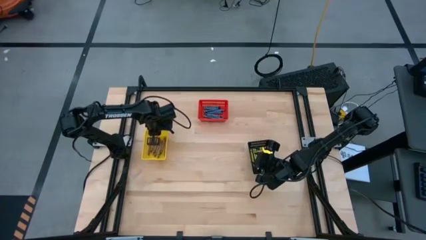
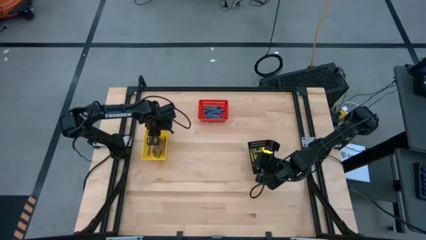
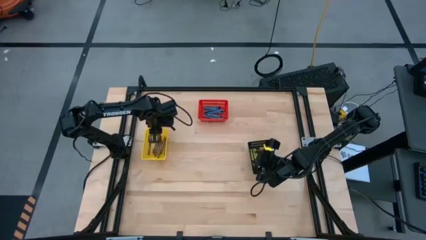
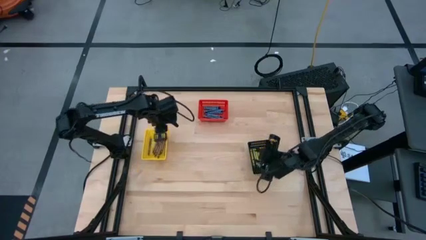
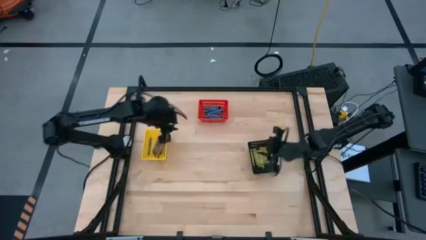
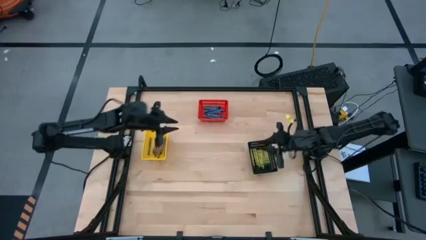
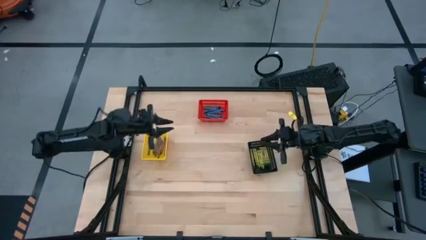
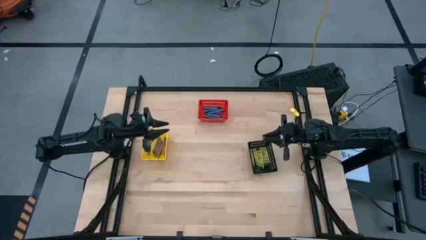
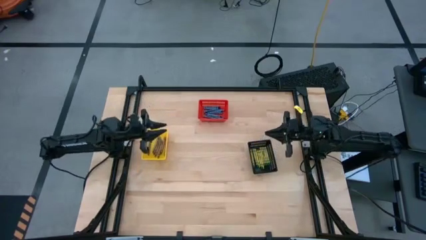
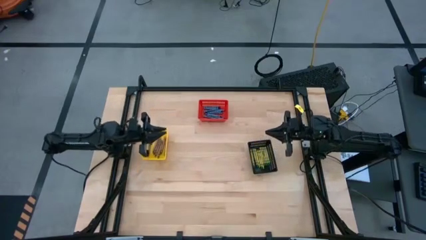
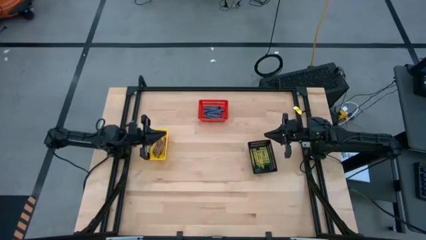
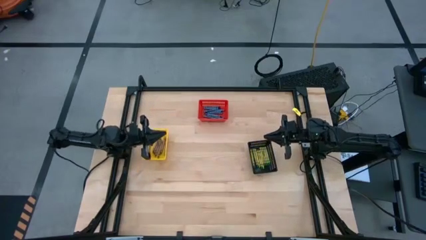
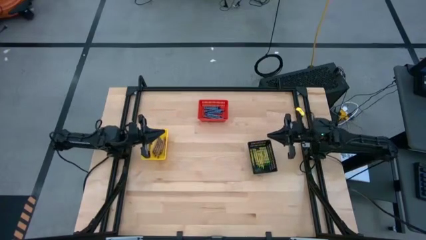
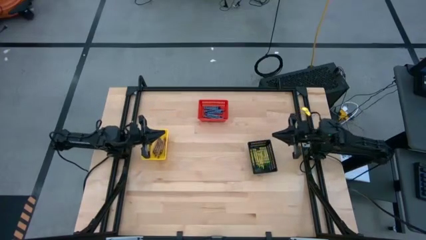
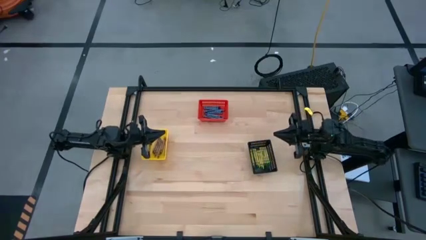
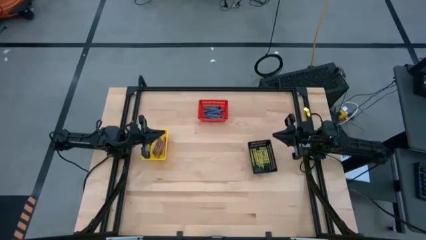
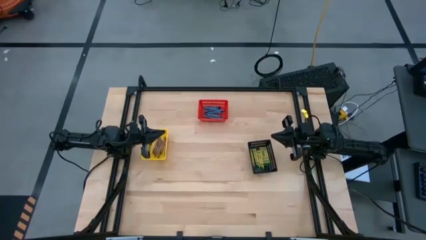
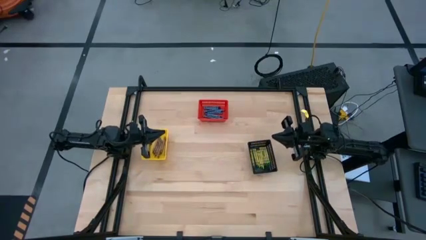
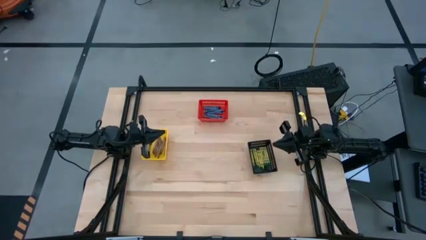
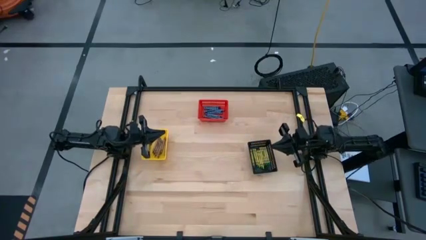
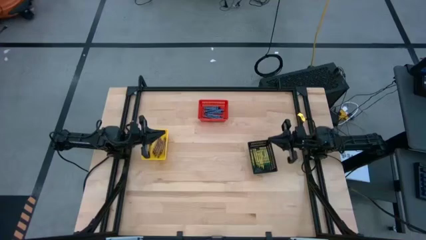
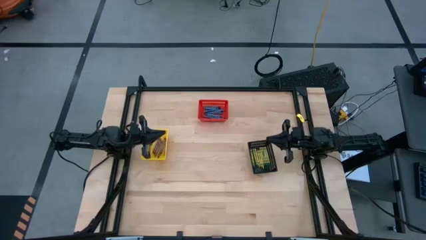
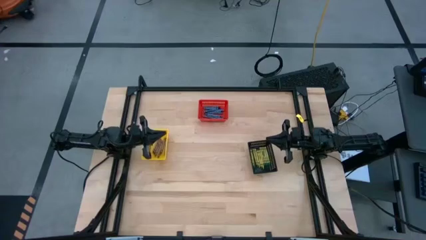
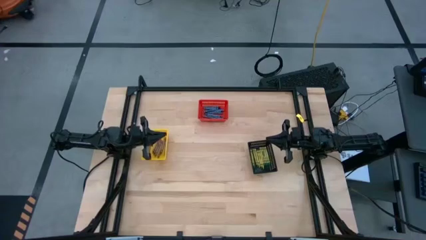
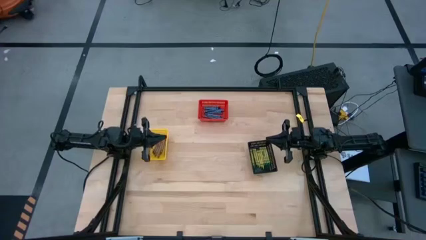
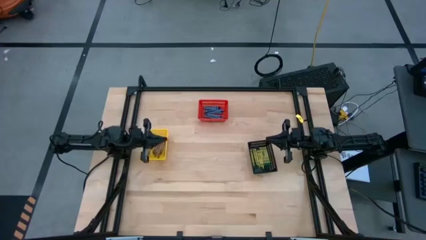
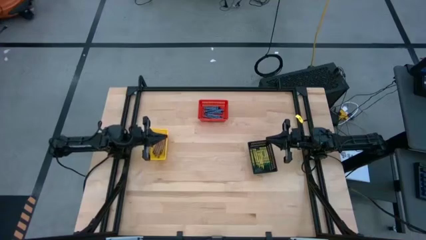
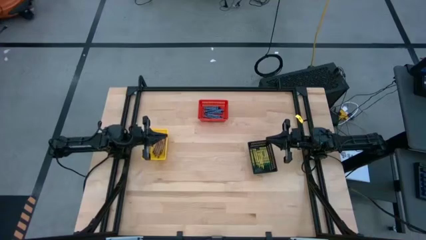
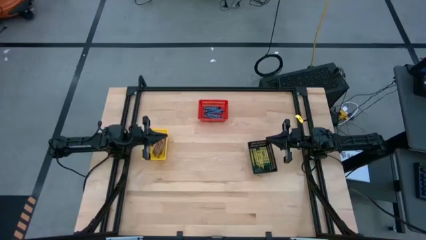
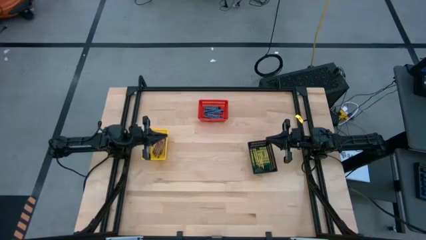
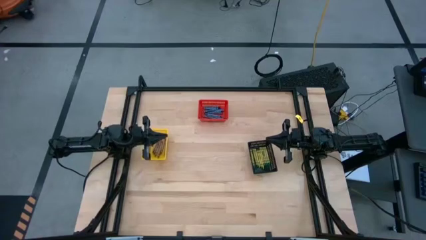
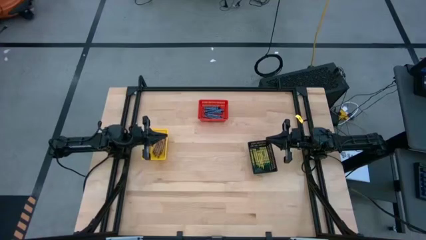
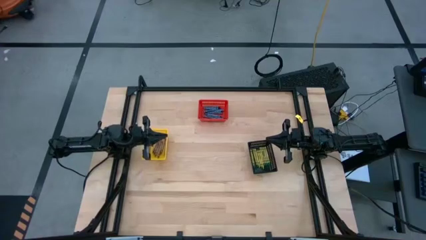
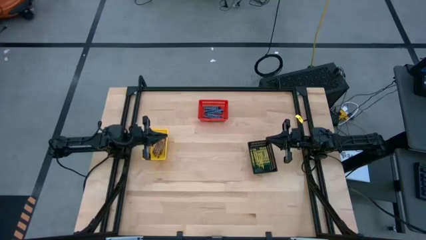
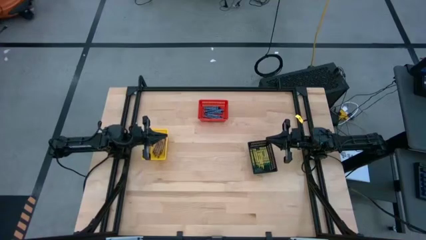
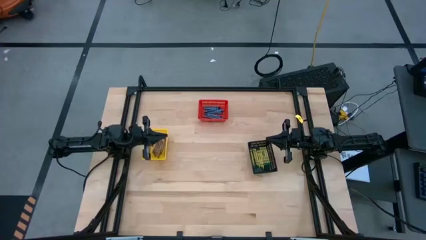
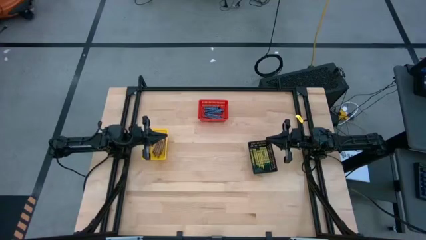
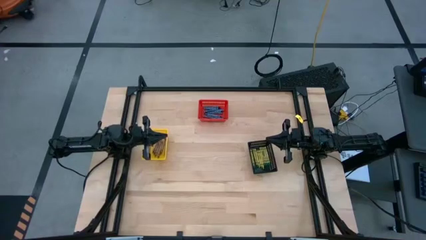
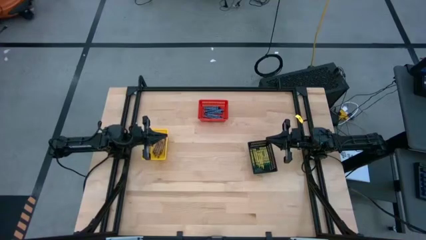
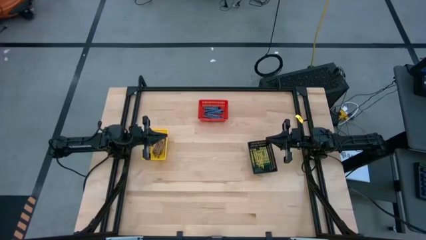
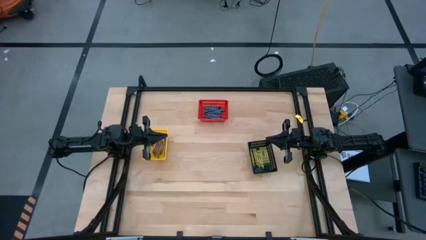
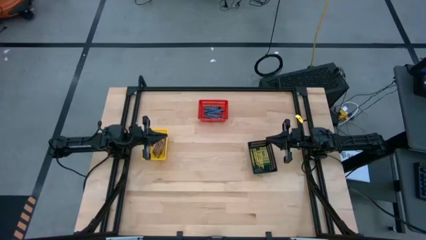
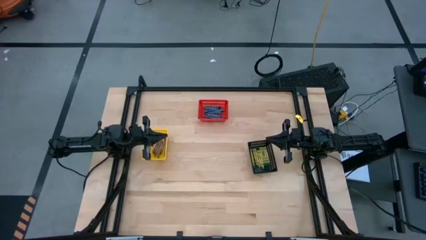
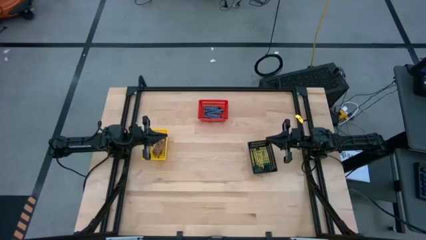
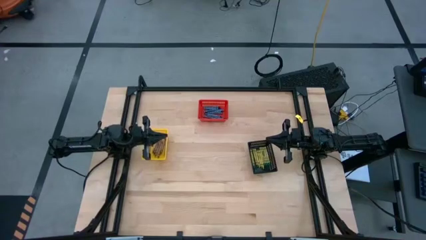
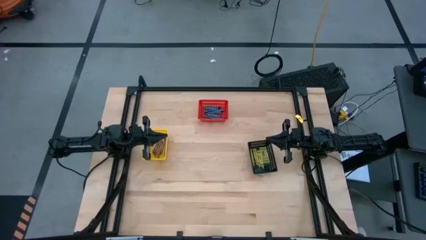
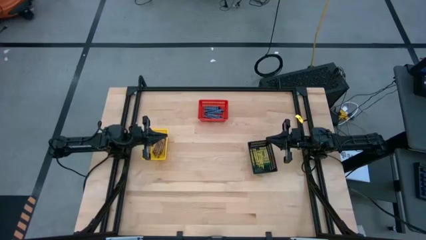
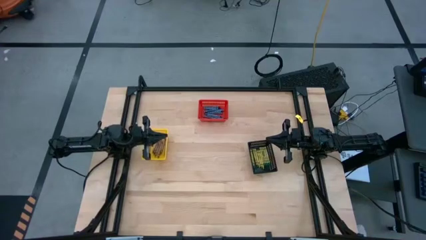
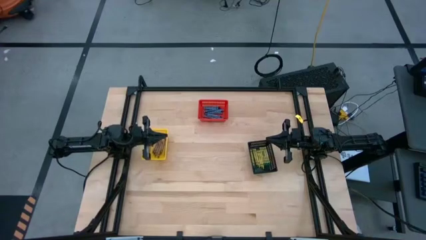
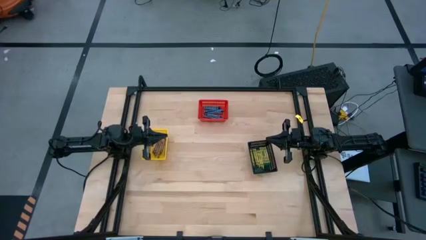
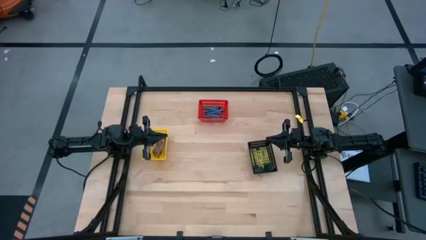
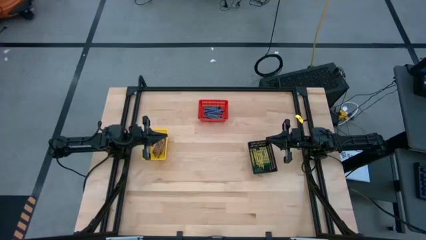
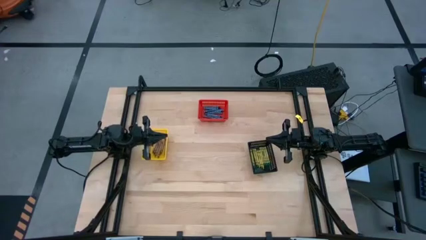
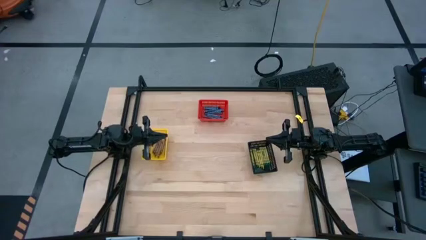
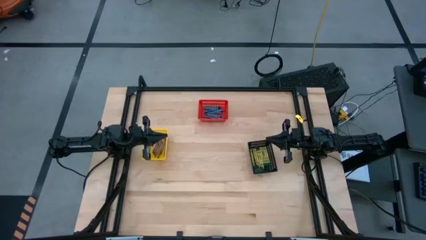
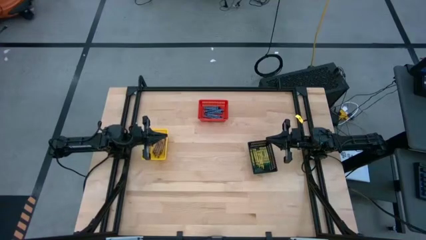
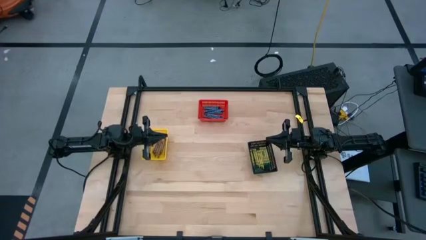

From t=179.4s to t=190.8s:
Task: Sort crayons
Return to Home Position

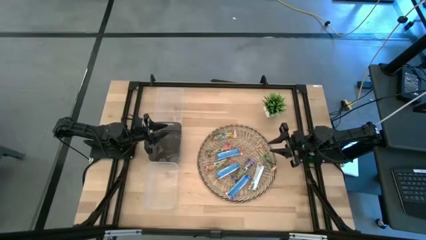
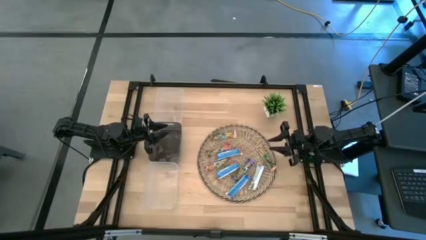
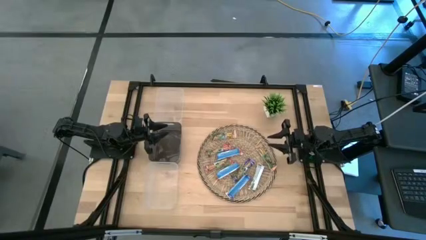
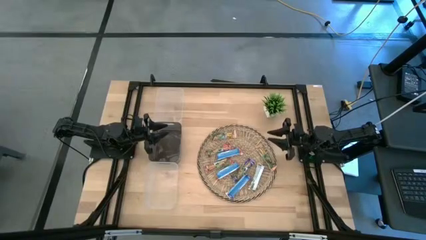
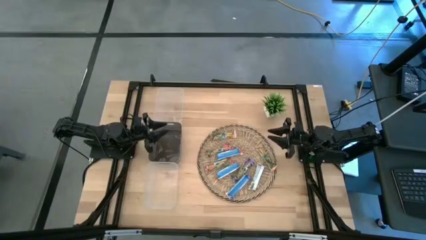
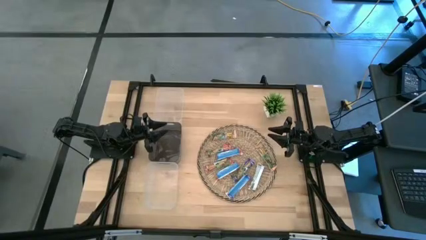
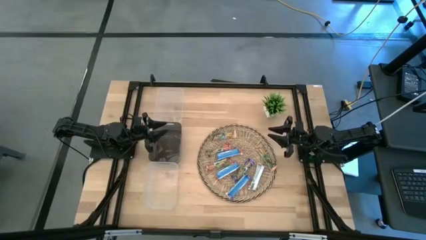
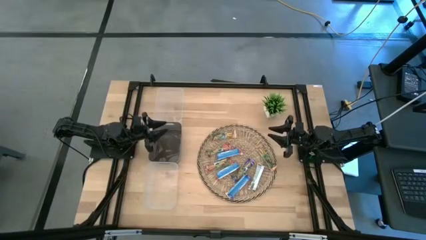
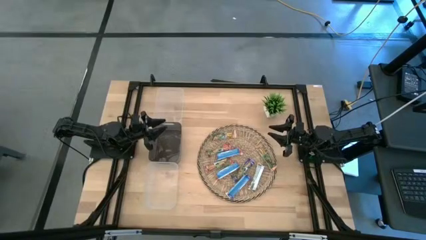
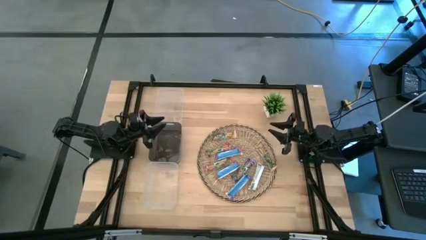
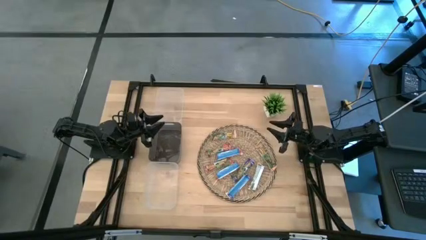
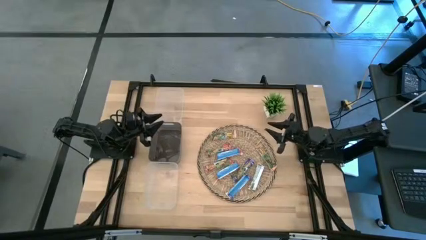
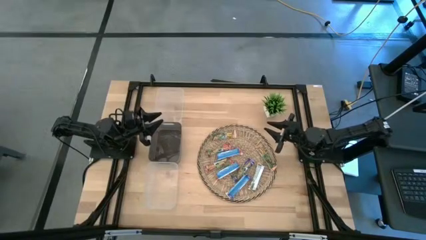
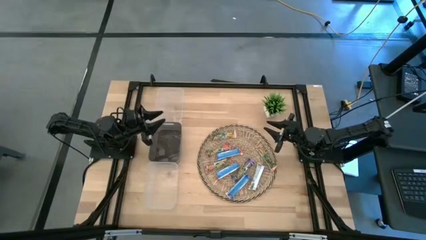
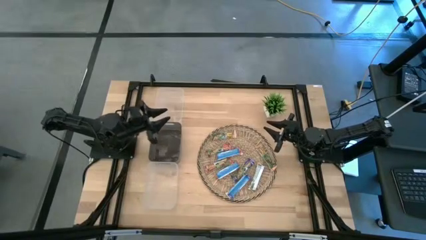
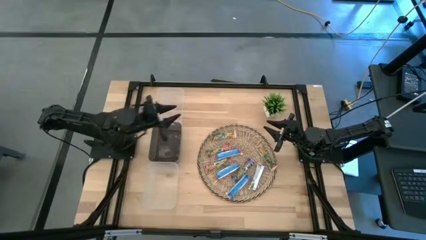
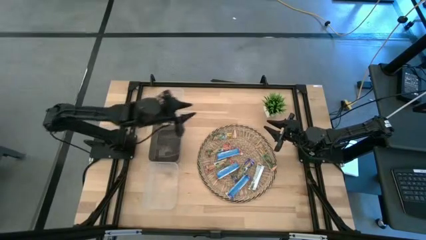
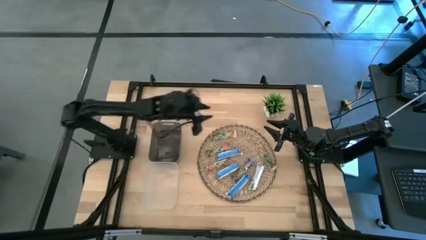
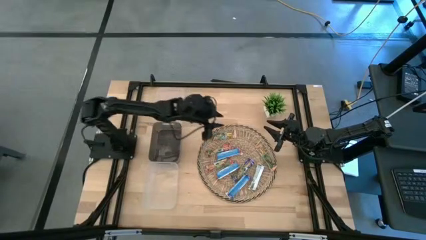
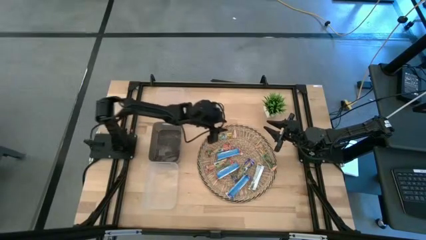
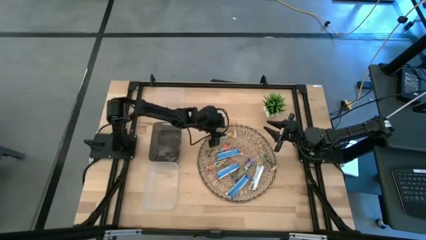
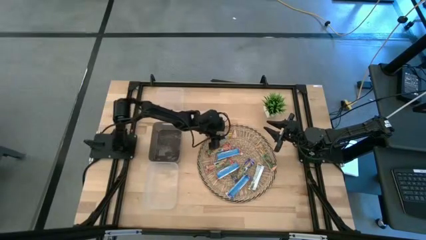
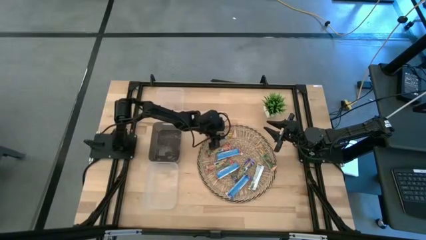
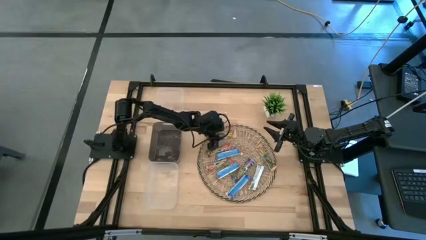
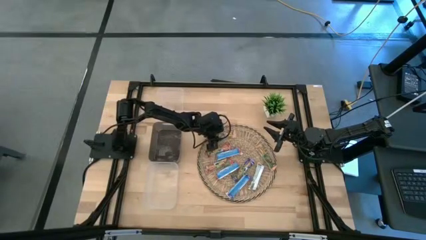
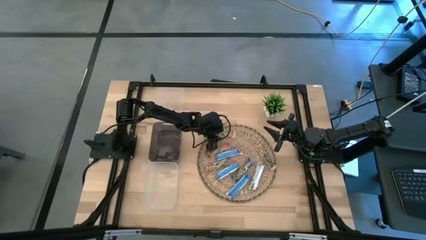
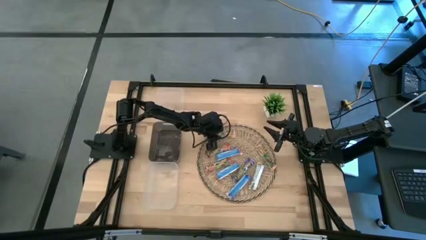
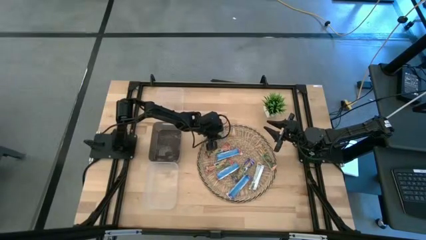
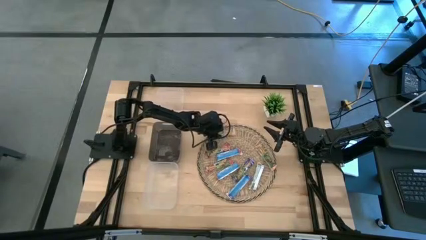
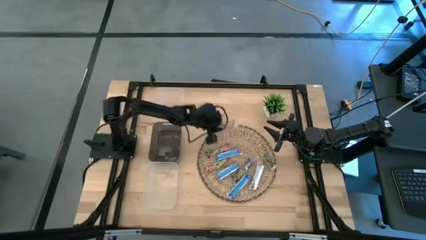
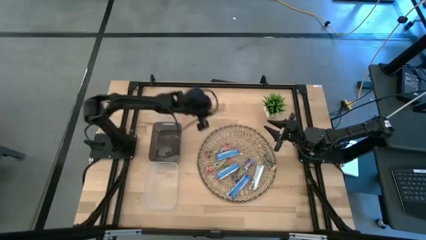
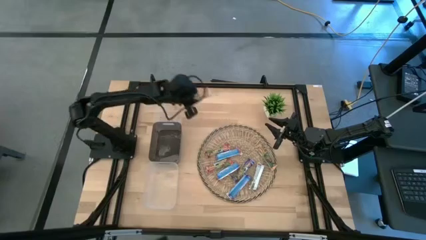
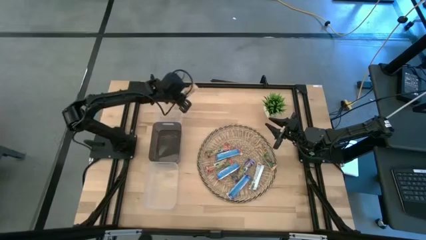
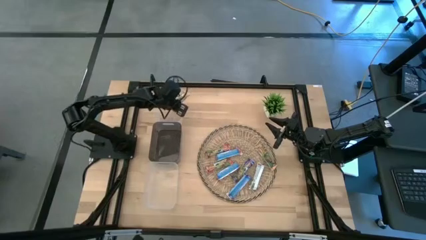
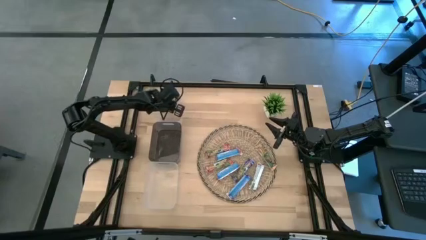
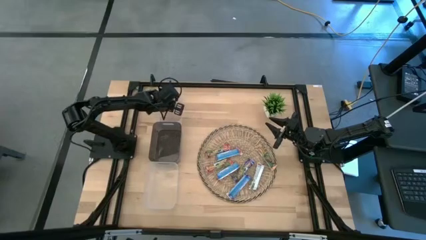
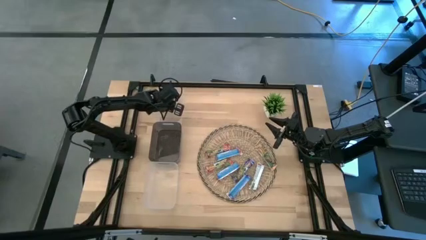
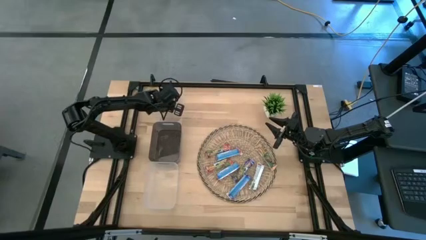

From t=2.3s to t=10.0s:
Task: Pick and place Granola Bars by type
Put the yellow granola bar into the top transparent bin
